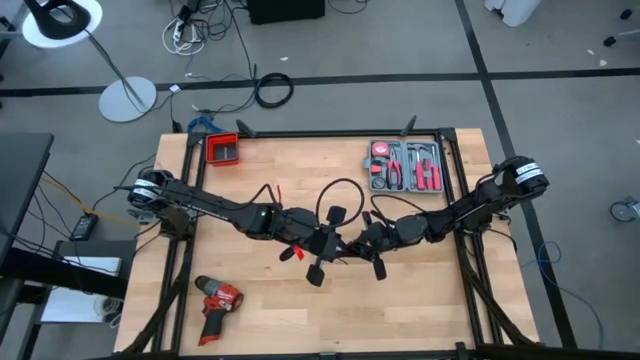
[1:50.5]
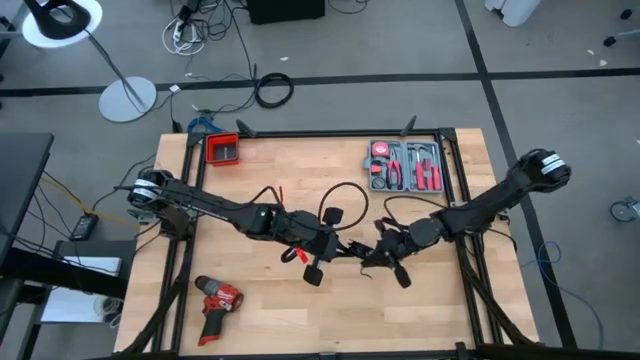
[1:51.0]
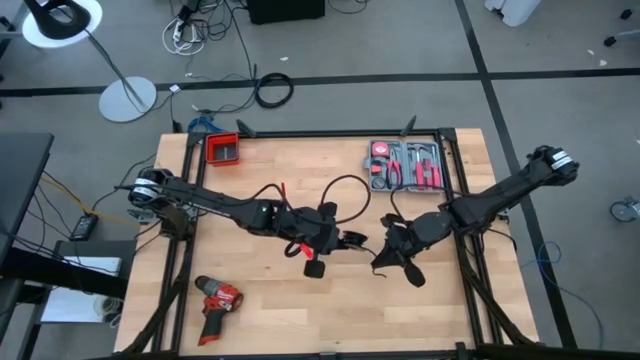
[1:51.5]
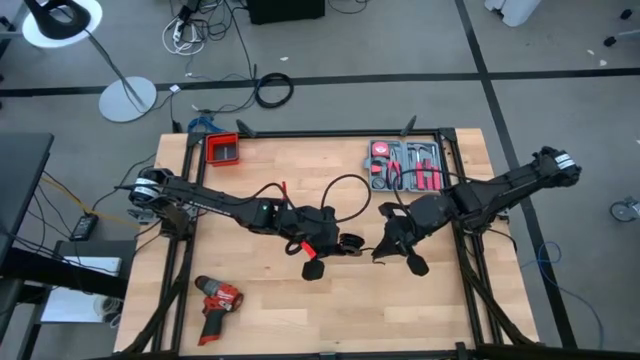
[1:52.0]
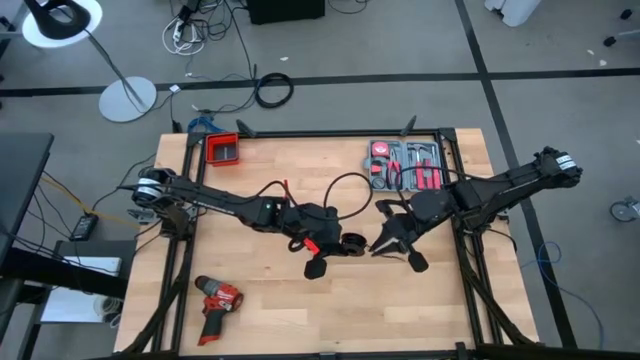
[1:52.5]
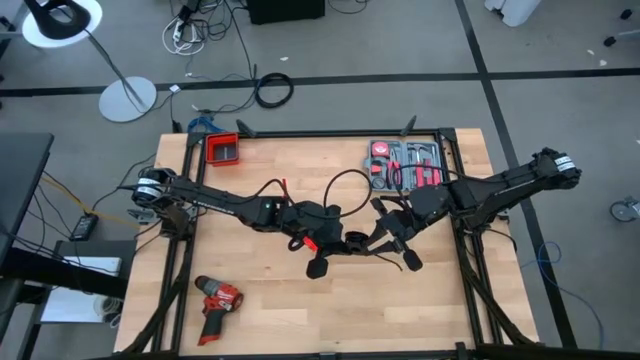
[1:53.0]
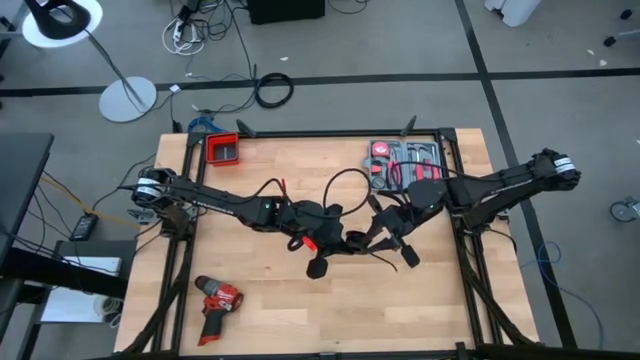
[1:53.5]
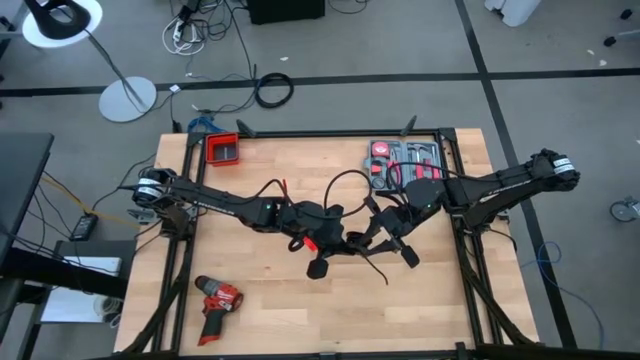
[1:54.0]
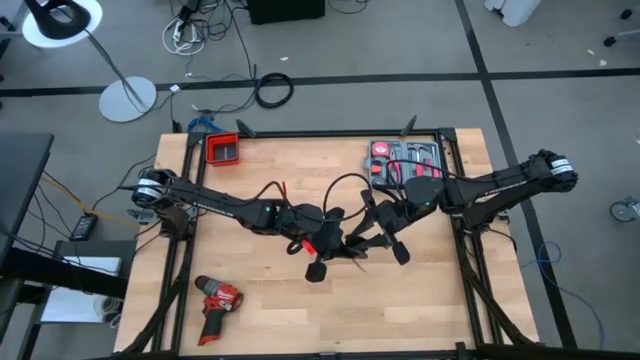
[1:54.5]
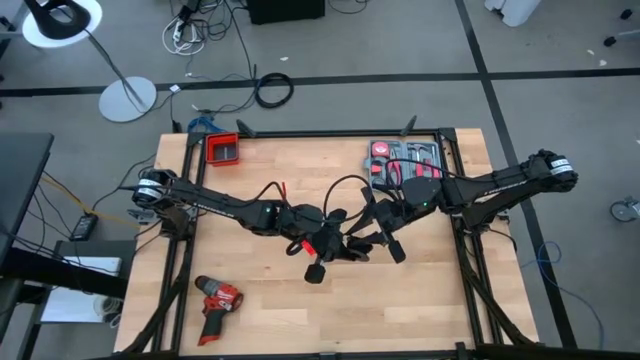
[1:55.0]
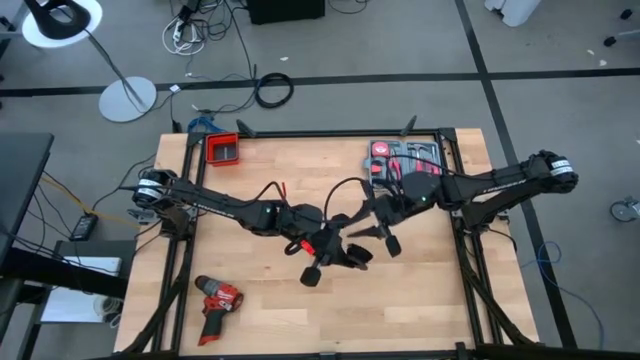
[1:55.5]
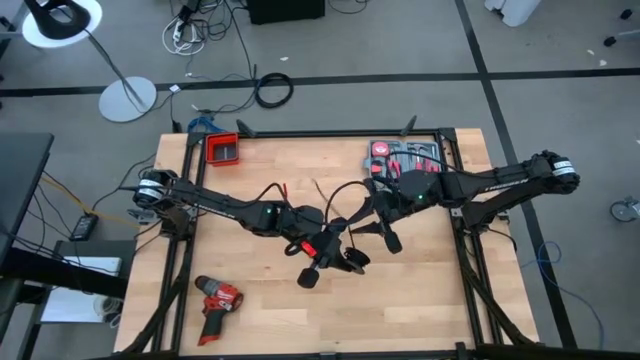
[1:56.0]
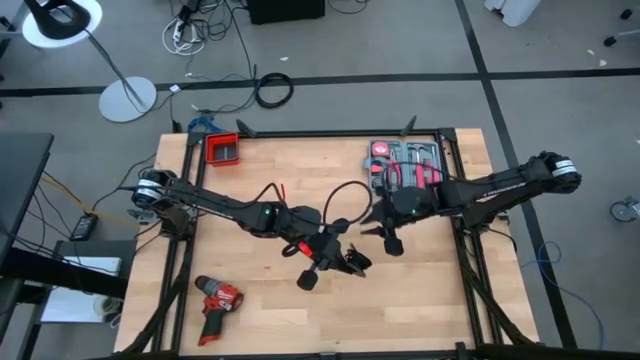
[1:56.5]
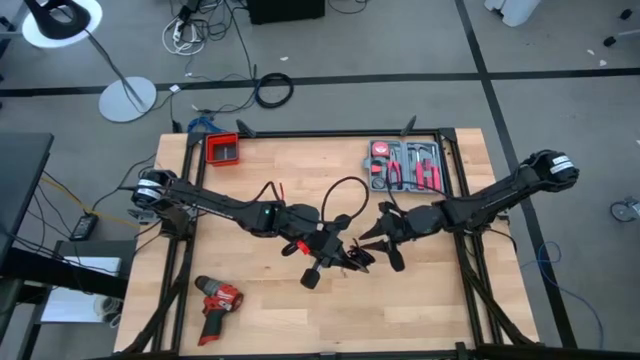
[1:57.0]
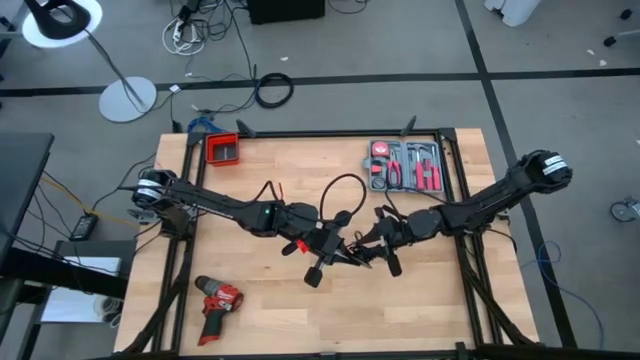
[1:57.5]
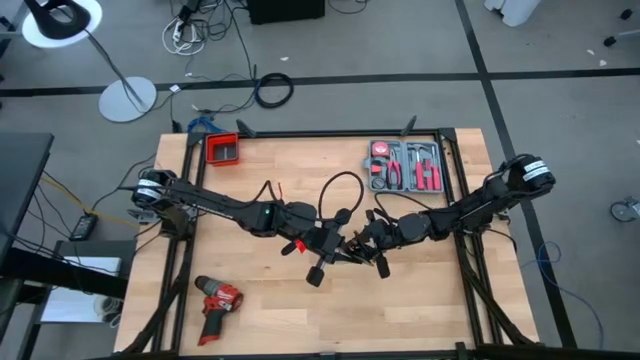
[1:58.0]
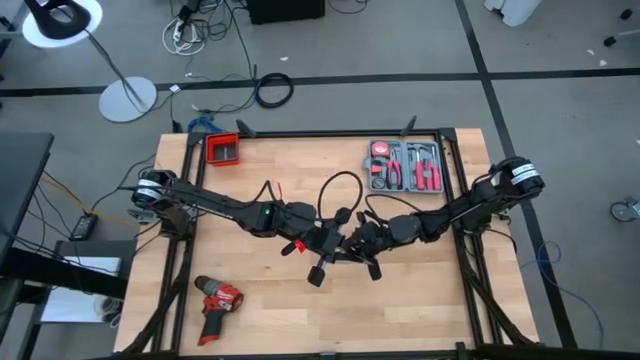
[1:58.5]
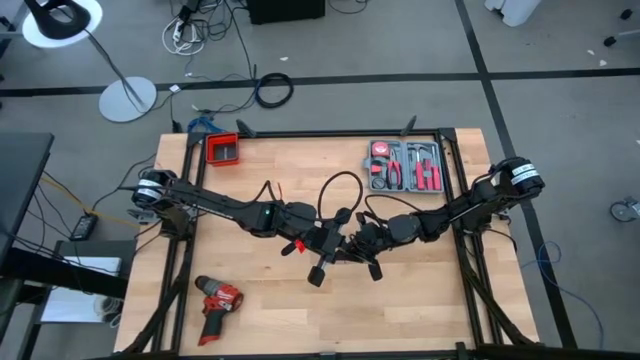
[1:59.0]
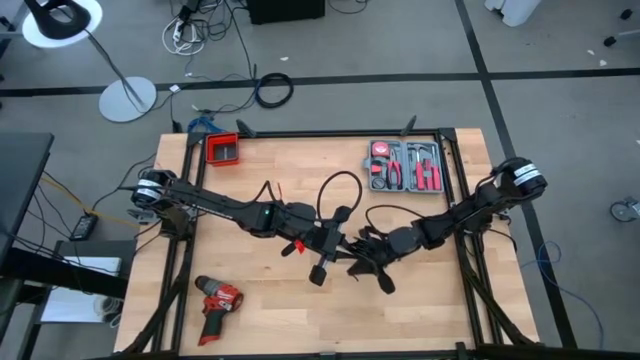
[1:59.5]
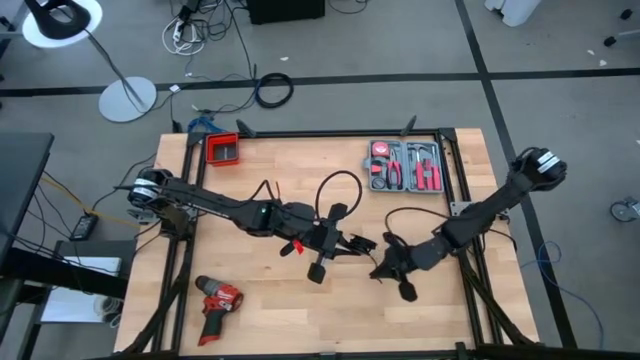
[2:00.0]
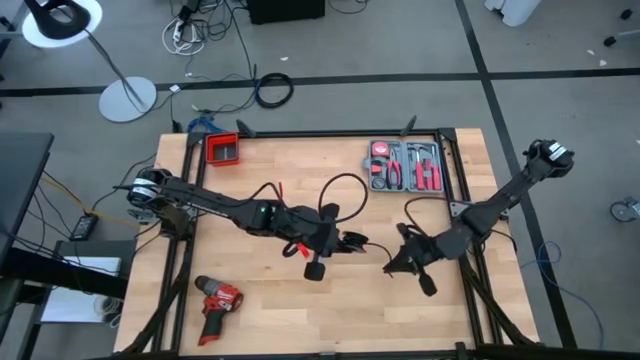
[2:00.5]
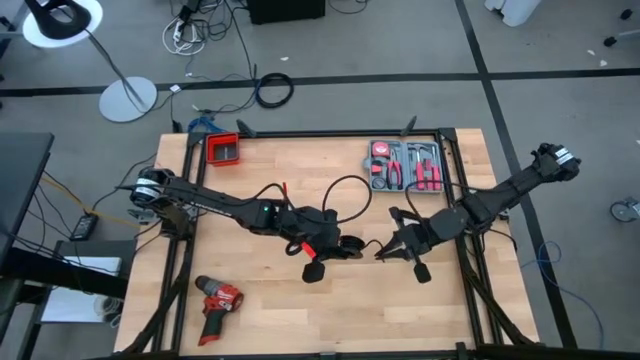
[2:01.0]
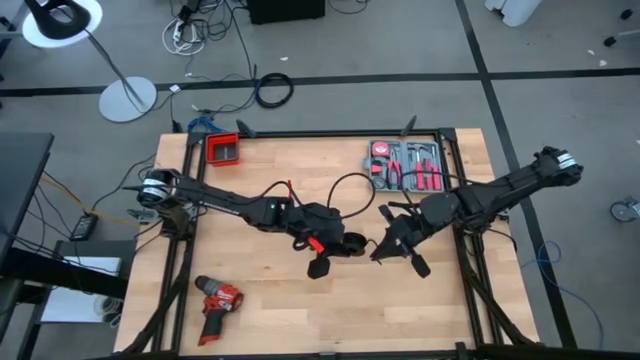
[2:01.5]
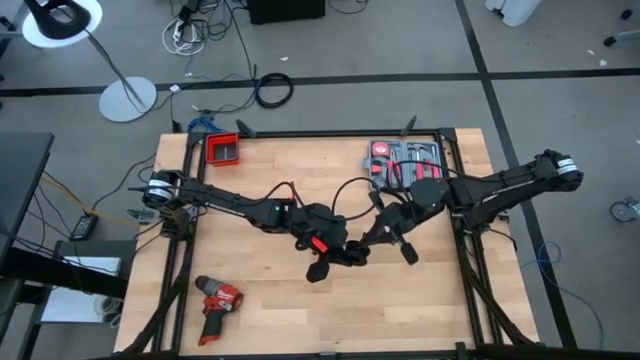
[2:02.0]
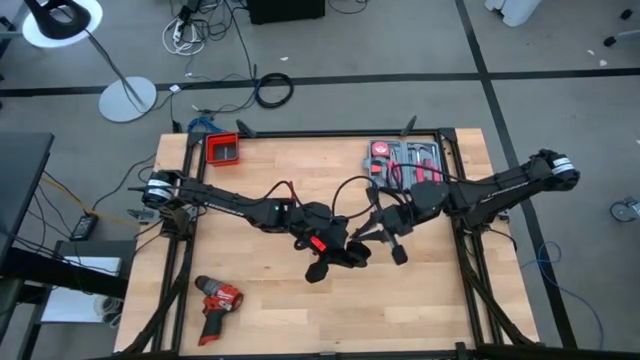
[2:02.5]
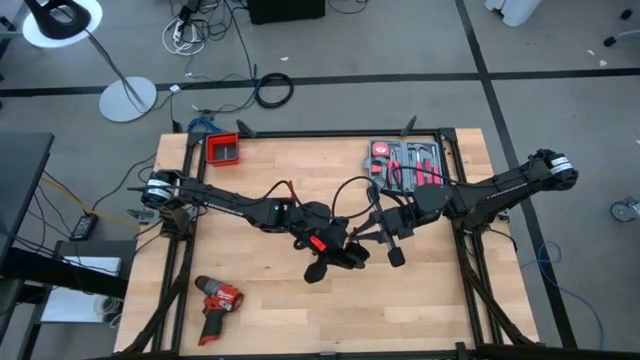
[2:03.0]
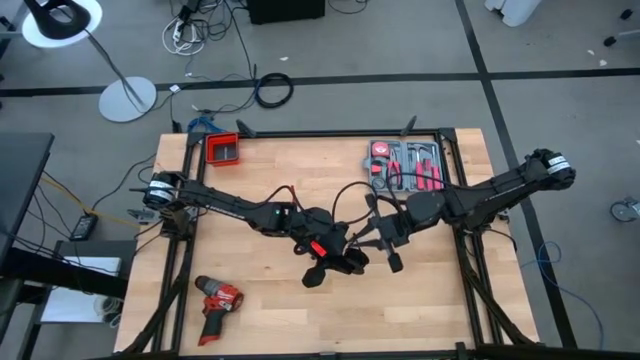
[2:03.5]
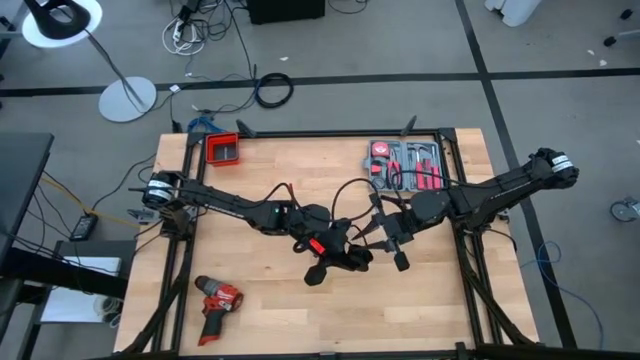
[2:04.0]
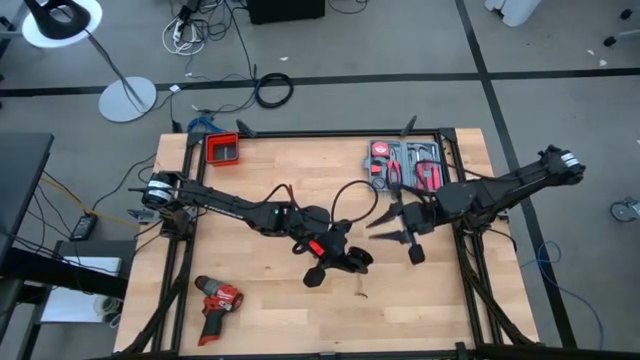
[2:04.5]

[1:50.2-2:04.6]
Task: Coil cords
Coil the black wire onto the black spool

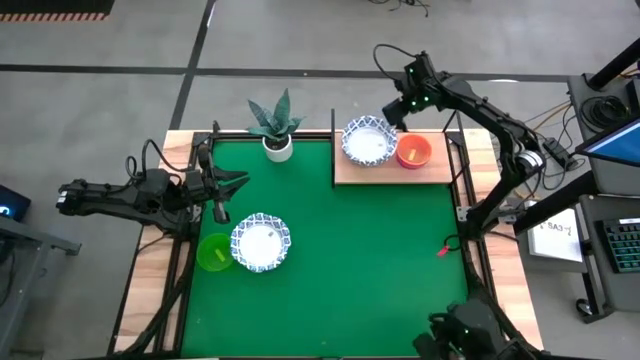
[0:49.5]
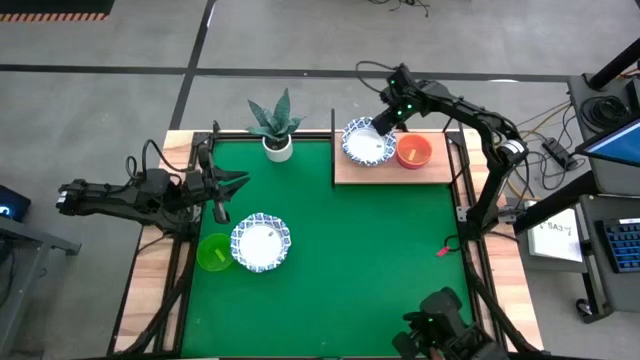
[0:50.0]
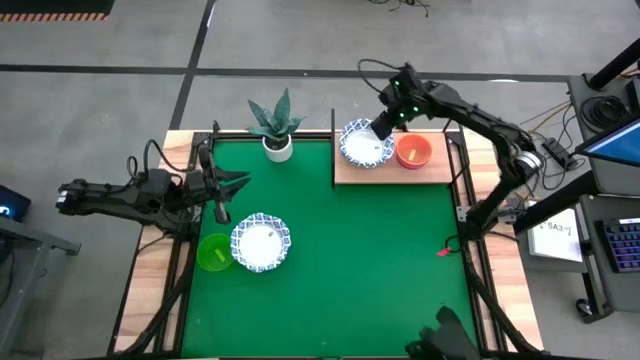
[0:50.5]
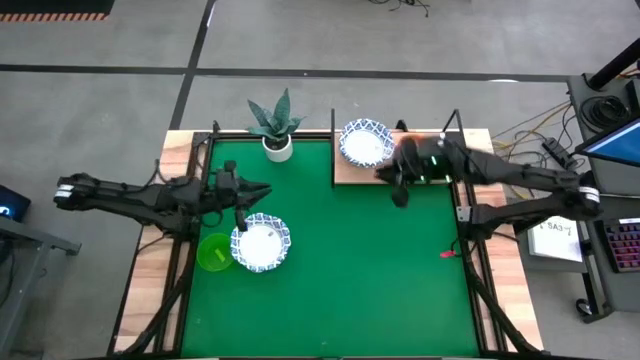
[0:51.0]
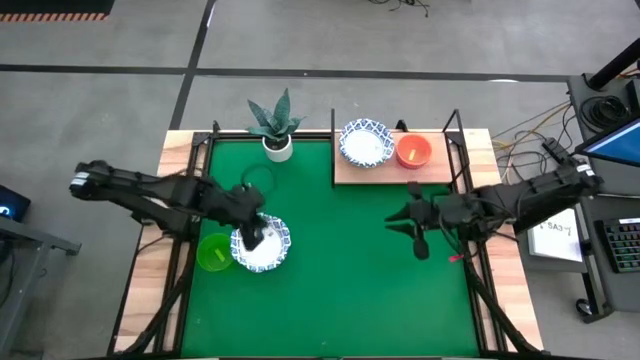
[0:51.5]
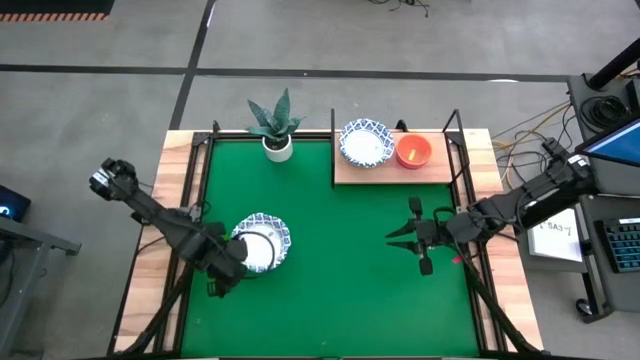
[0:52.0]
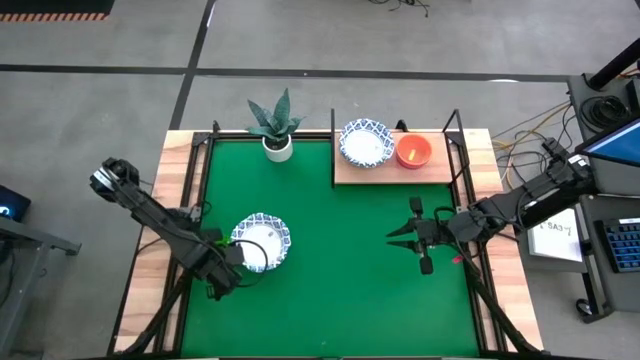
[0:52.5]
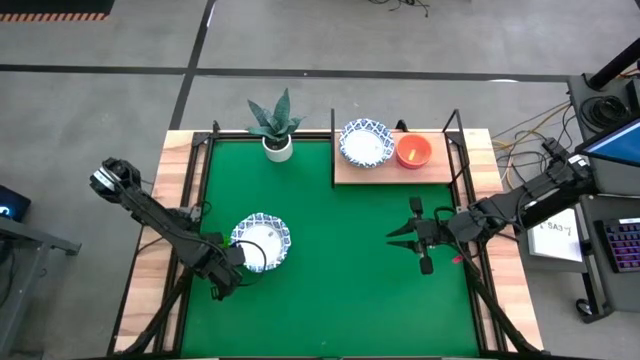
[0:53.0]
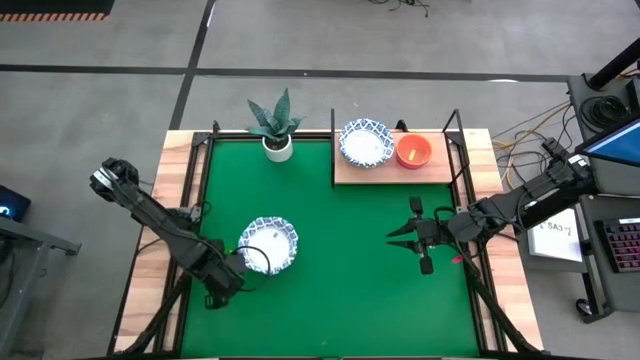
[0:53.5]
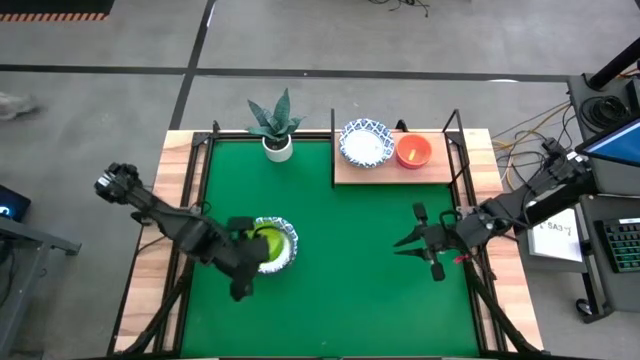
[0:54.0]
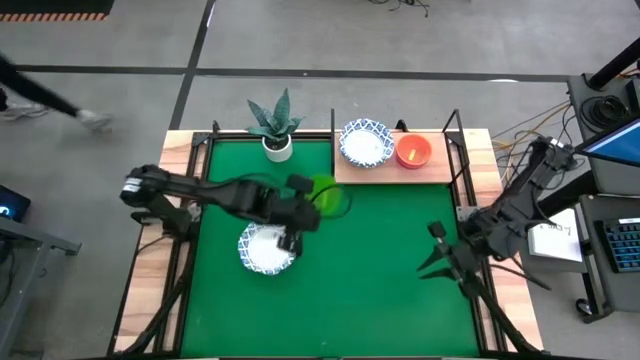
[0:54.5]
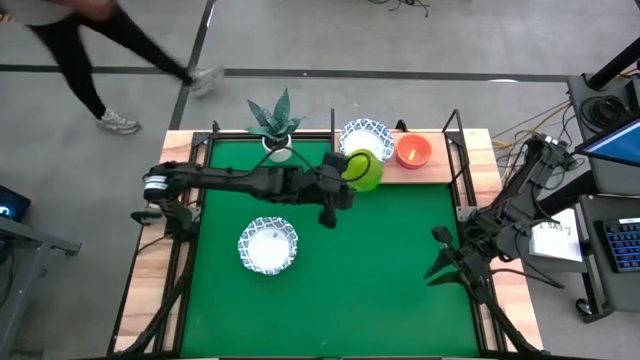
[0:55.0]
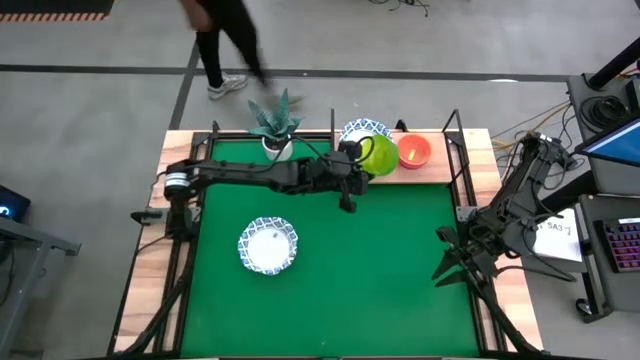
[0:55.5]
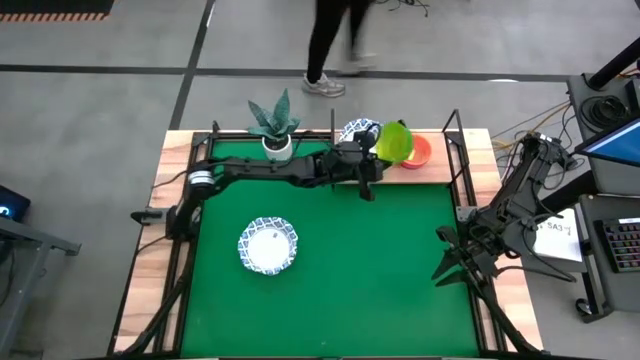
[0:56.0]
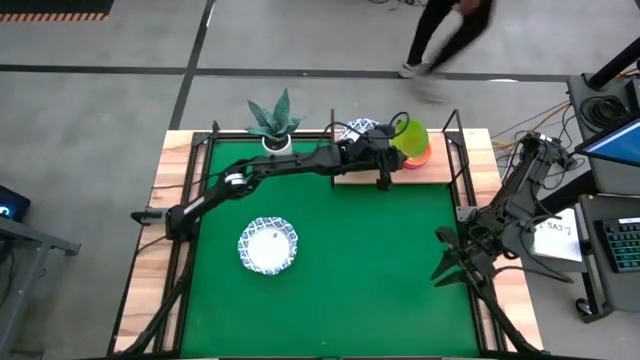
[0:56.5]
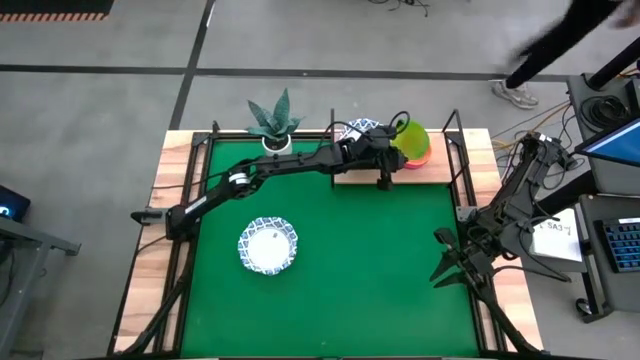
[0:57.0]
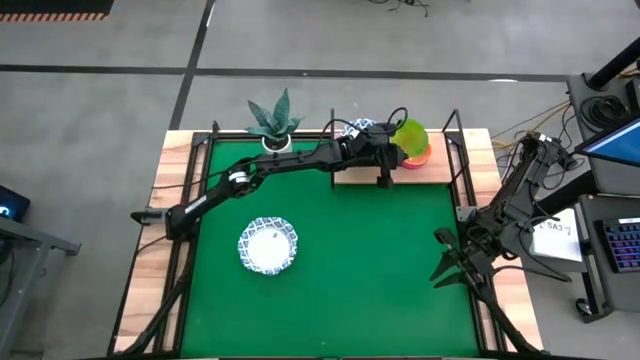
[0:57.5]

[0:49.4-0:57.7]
Task: Place and stack bowls onto a shelf
Stack the green bowl on top of the yellow bowl on the shelf
